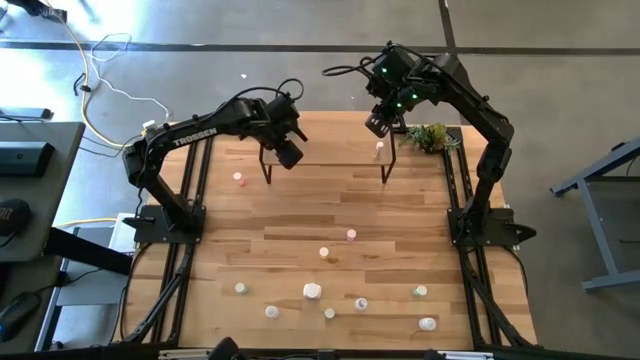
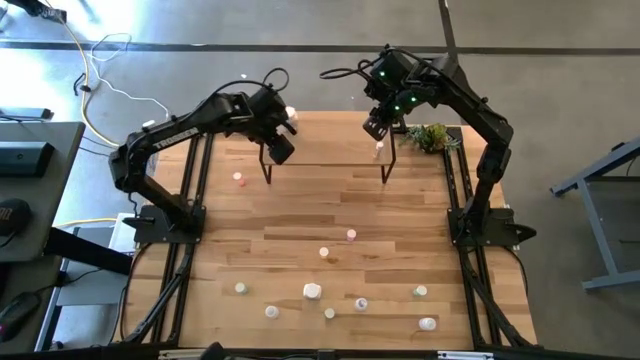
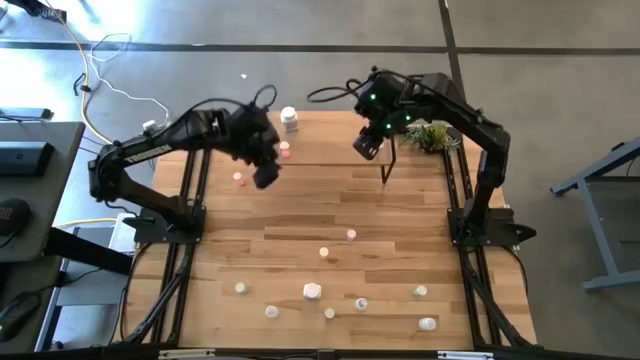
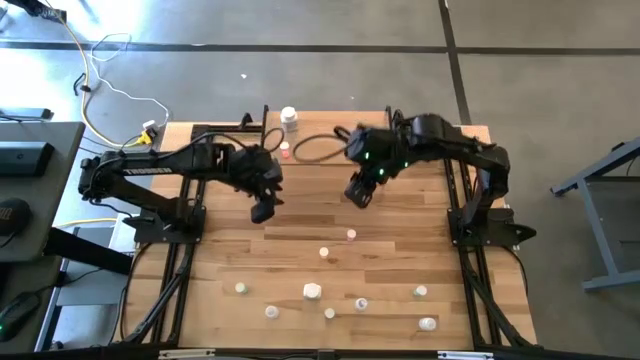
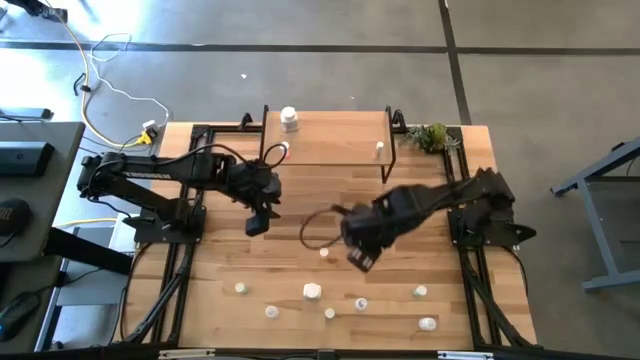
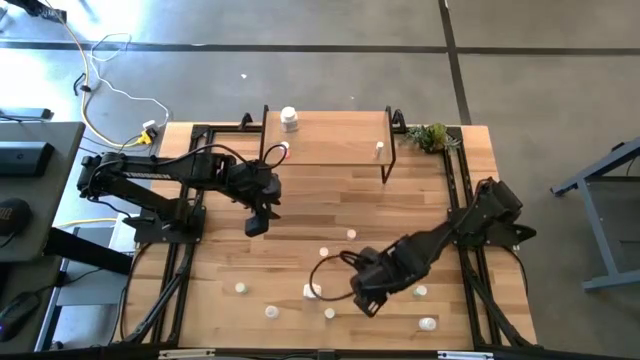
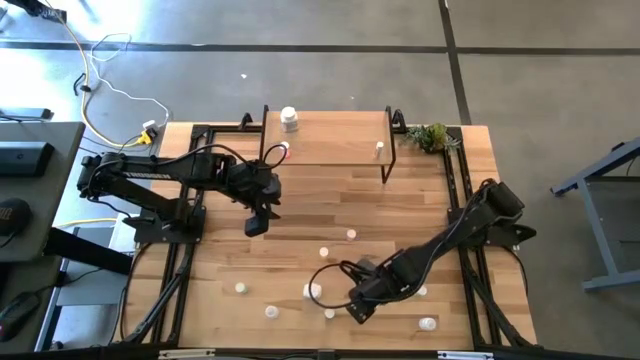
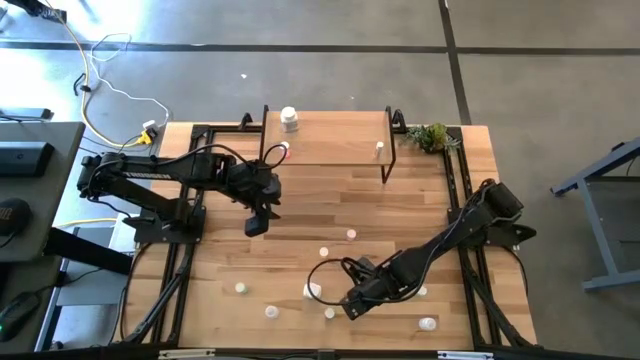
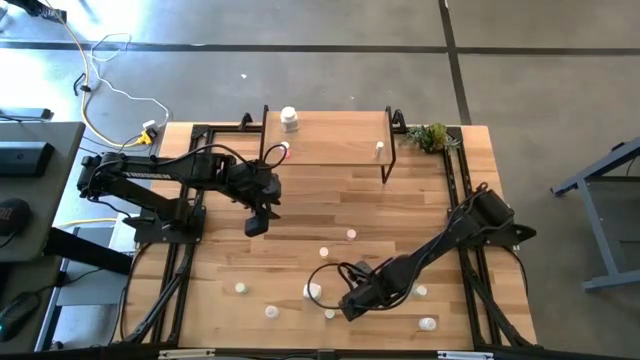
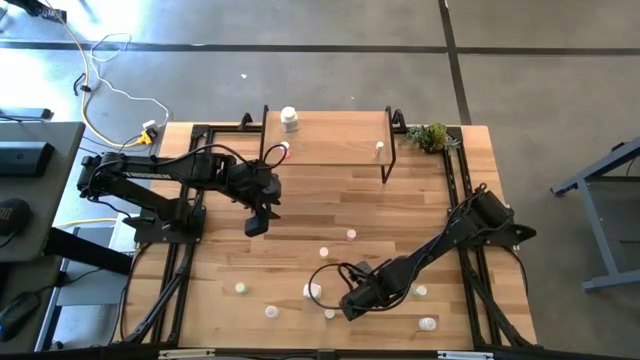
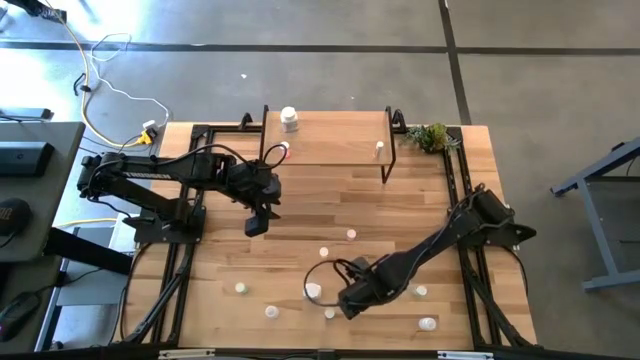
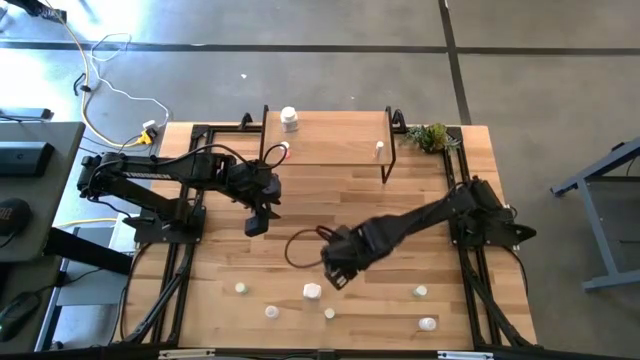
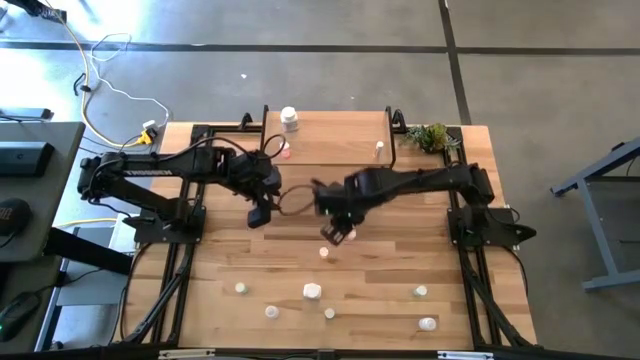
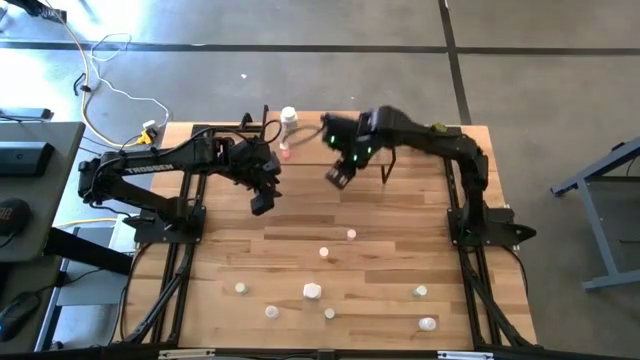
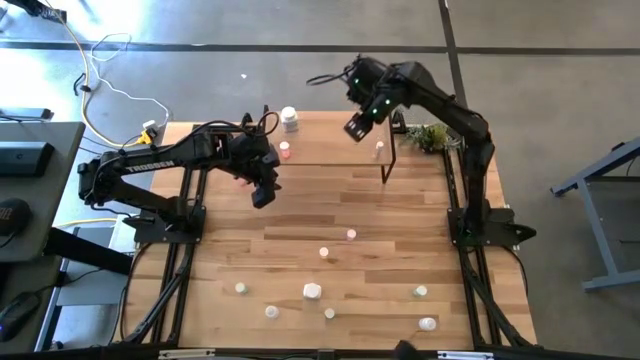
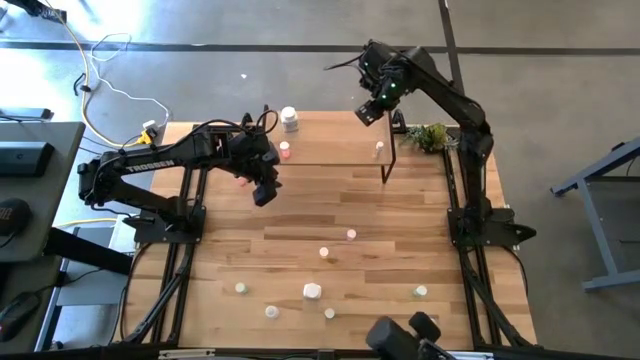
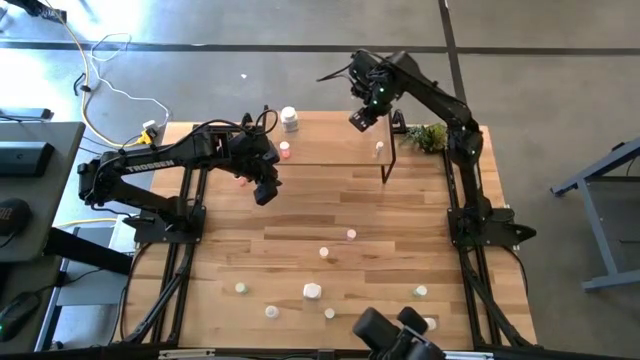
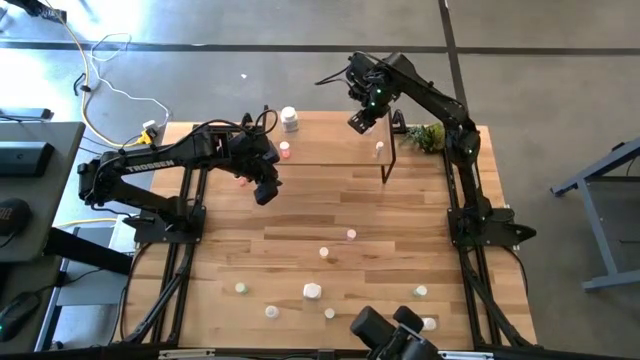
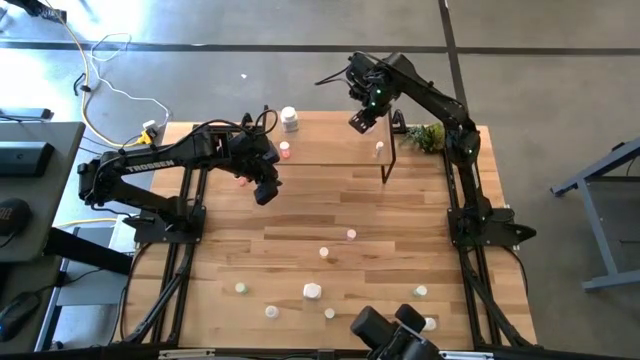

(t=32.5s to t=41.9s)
Task: Pick and place medicine bottles onto shelf by color
Put the middle transparent pill bottle on the shelf

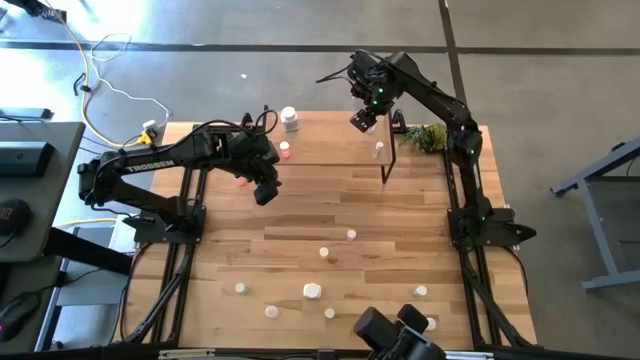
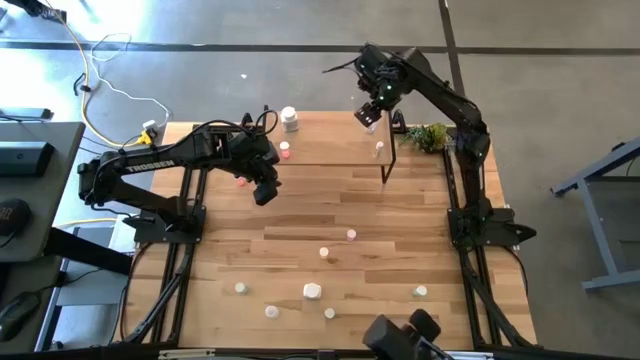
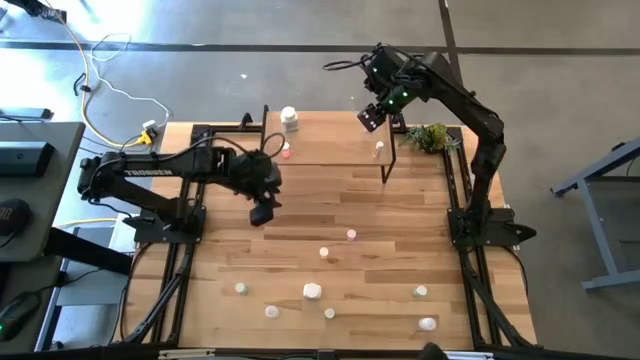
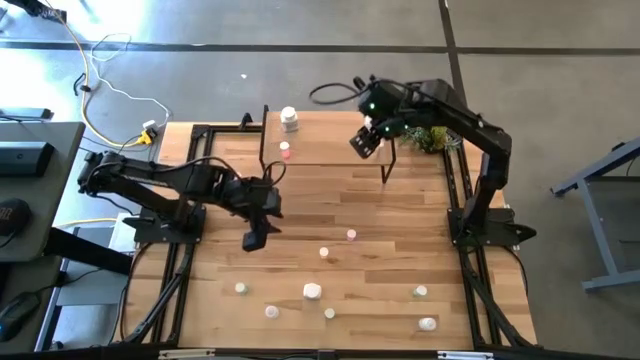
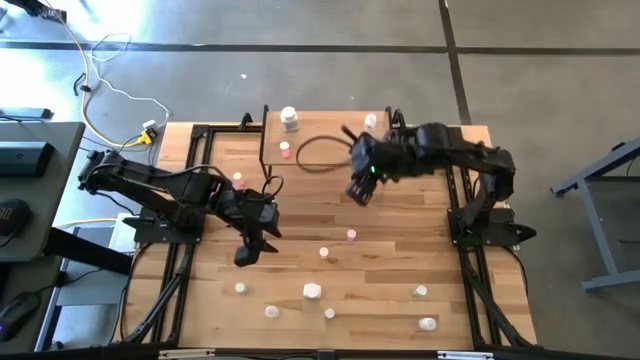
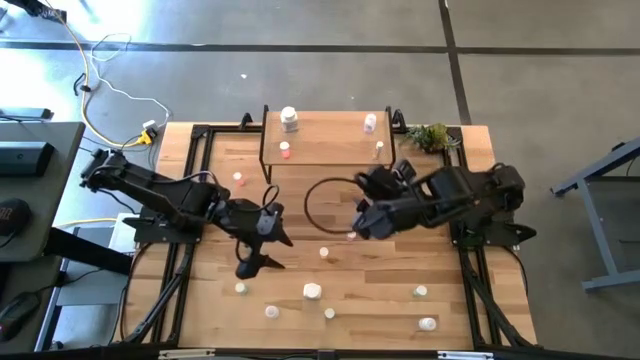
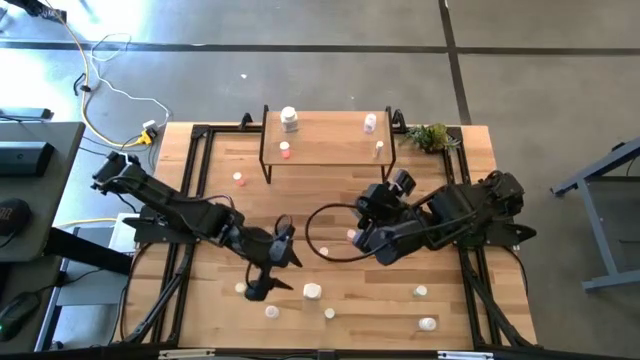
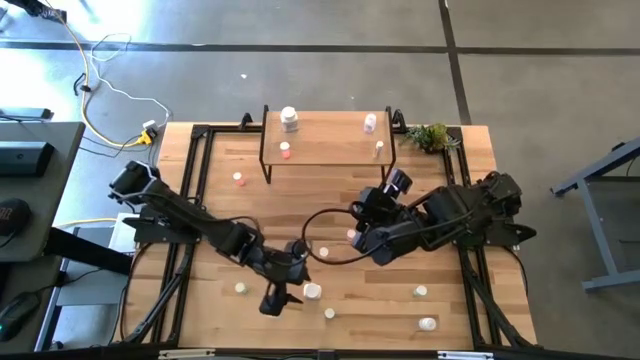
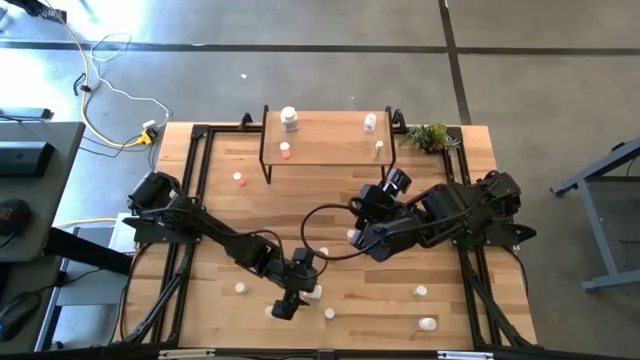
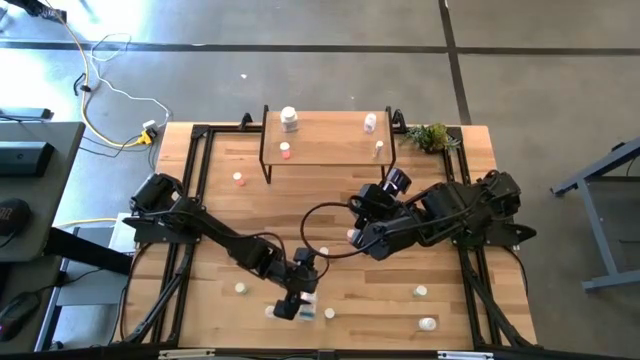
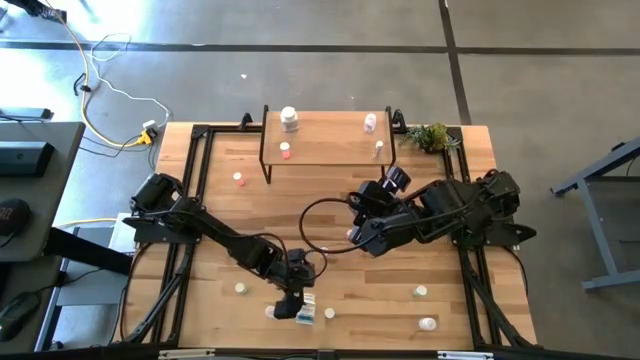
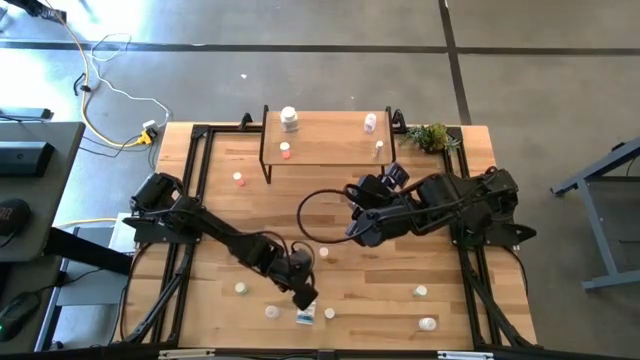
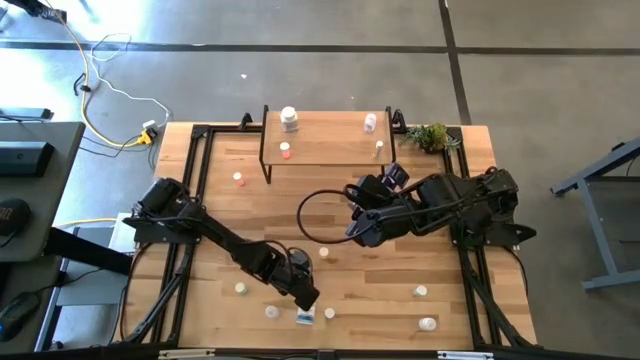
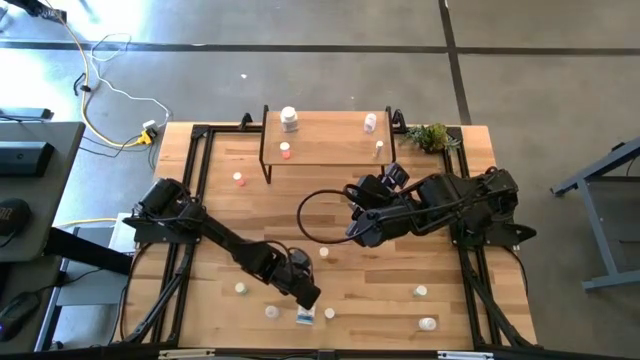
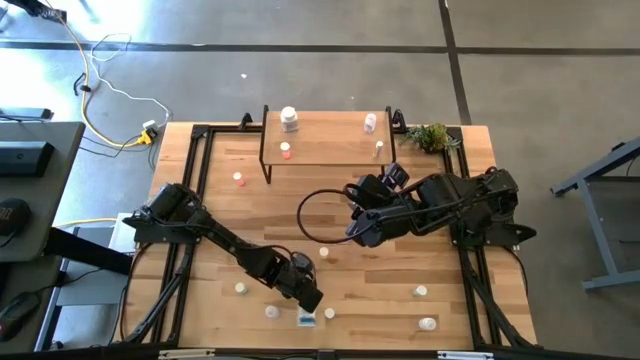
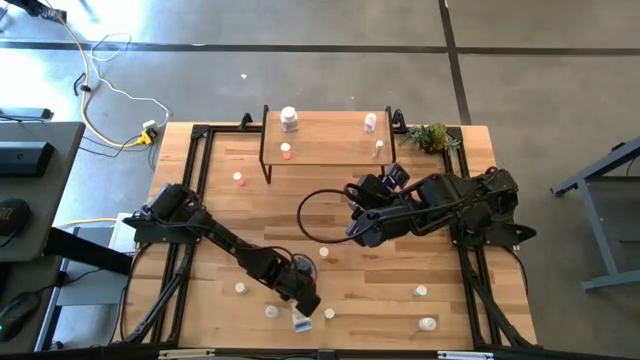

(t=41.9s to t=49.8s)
Put the white pill bottle on the shelf

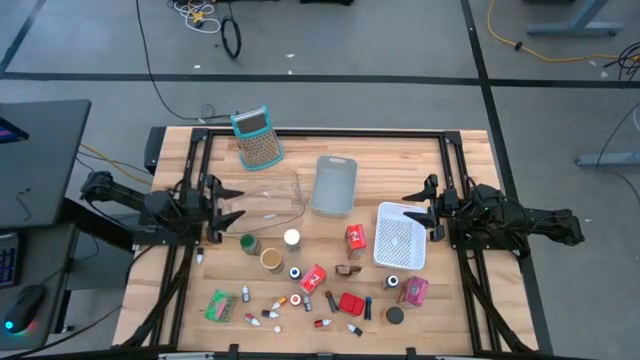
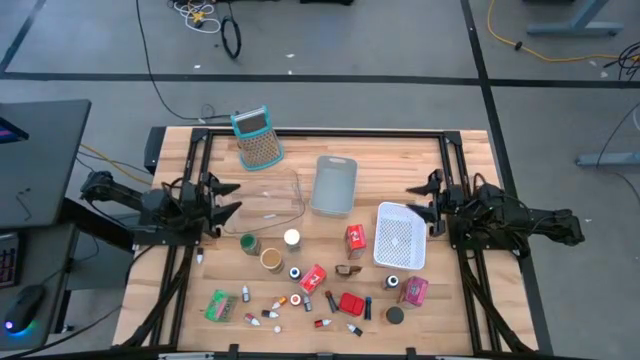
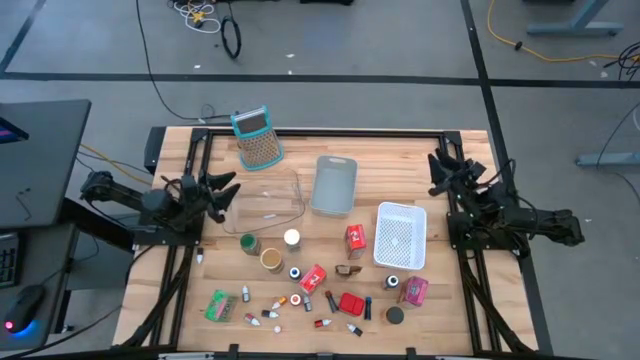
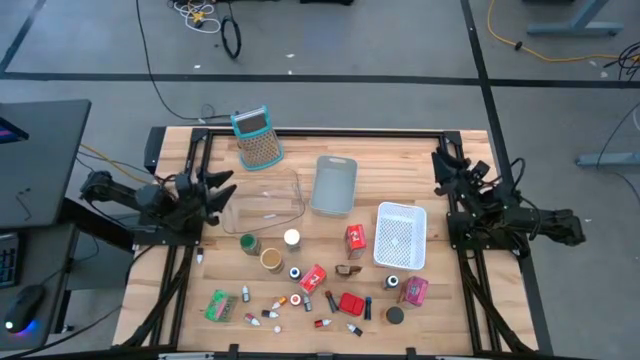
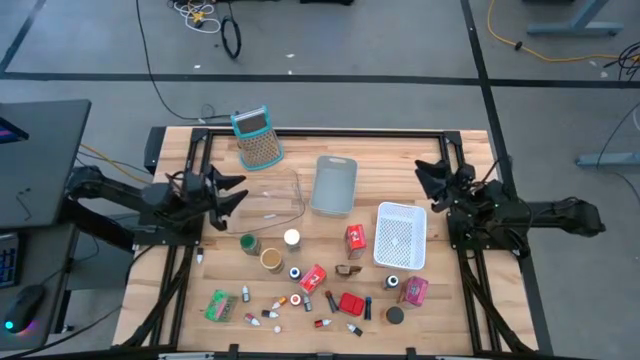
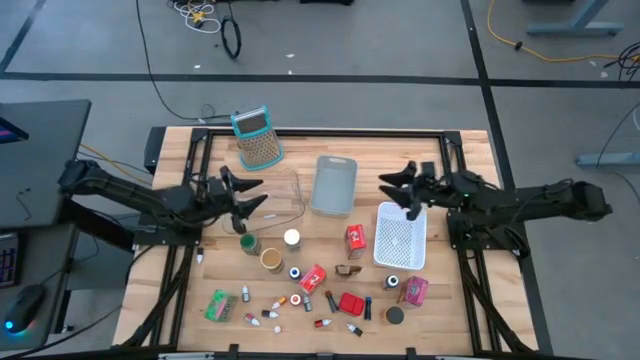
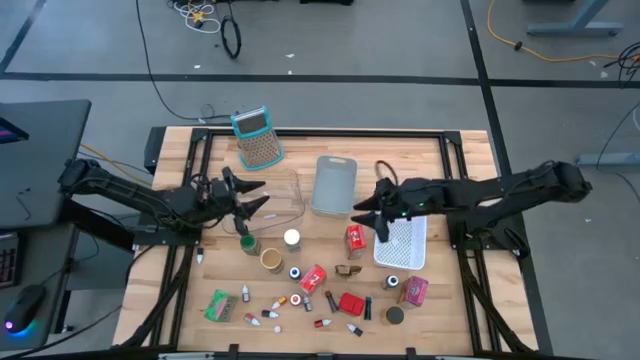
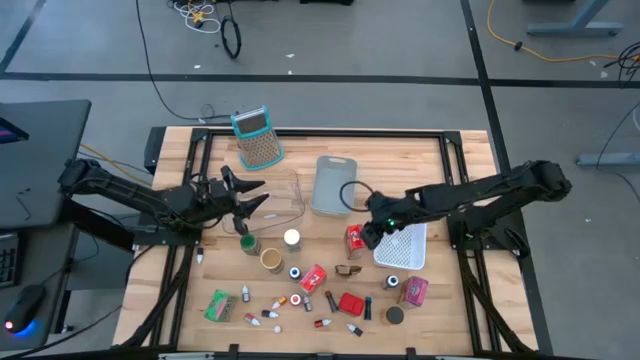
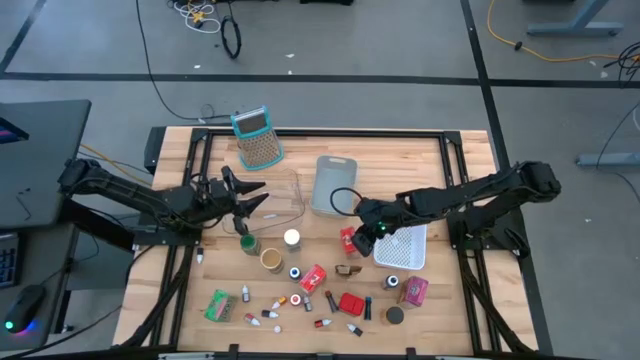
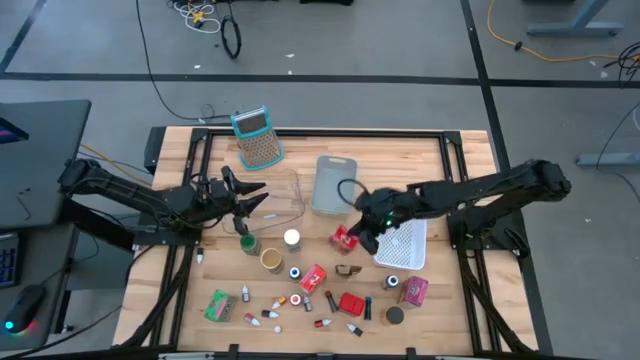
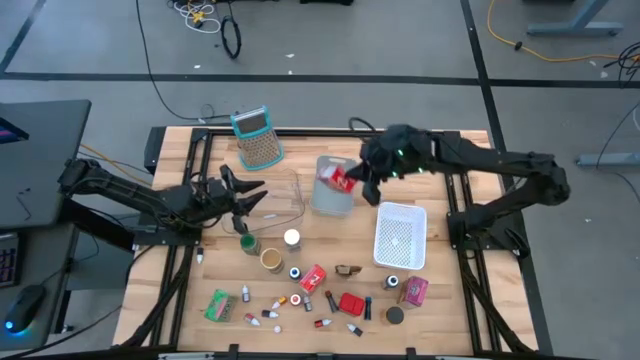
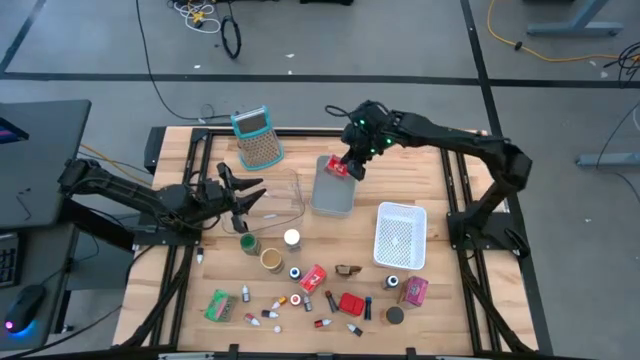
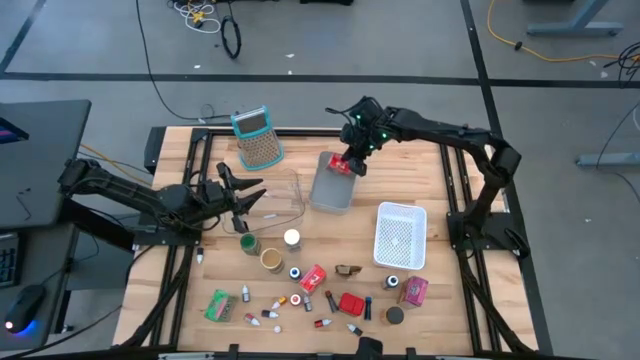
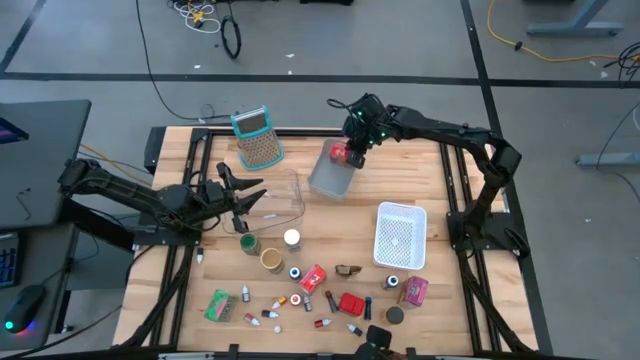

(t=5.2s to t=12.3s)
Task: Pick & Place Kitchen Items
Put the right red cereal box into the gray bin
